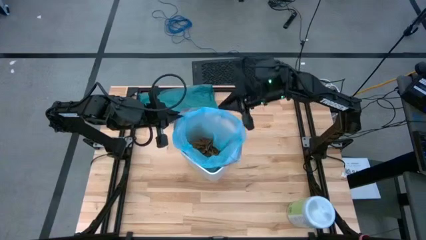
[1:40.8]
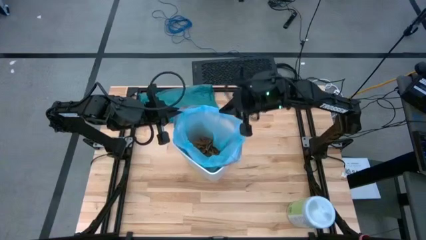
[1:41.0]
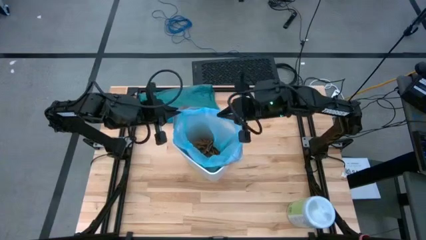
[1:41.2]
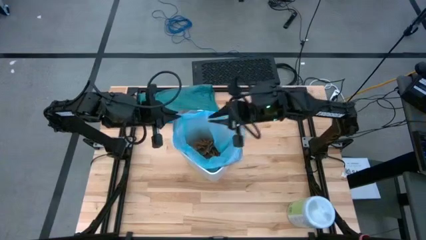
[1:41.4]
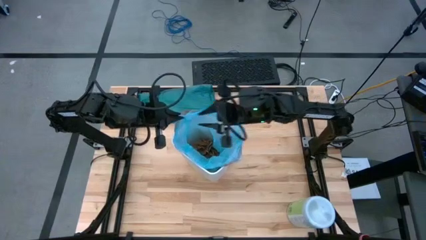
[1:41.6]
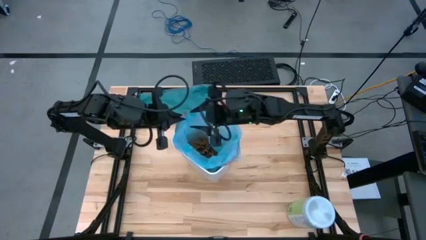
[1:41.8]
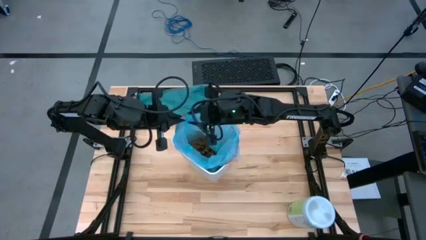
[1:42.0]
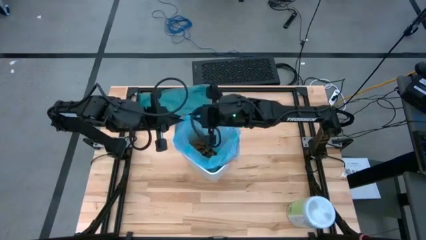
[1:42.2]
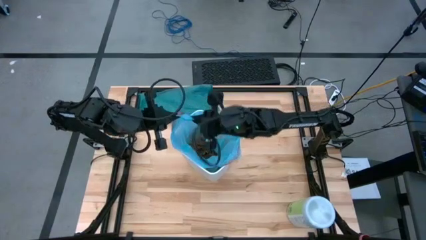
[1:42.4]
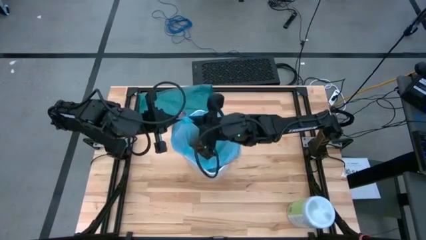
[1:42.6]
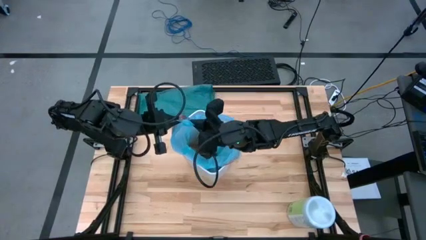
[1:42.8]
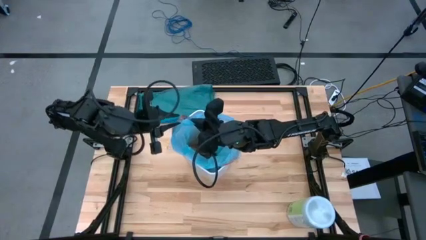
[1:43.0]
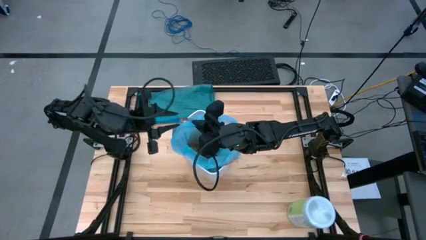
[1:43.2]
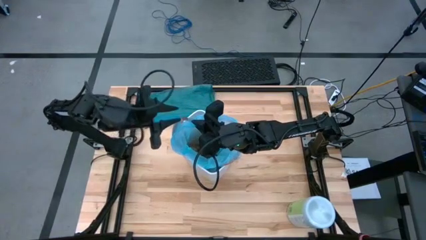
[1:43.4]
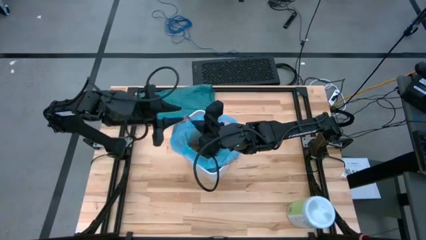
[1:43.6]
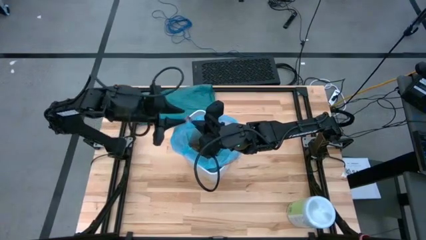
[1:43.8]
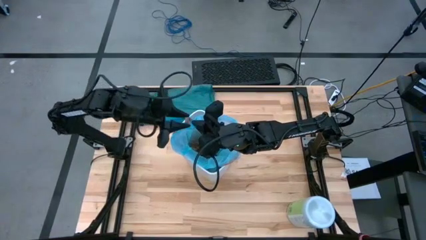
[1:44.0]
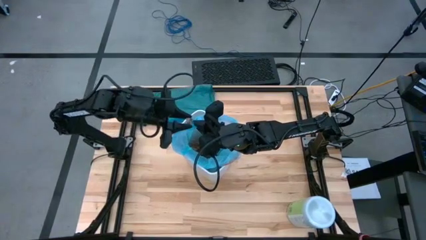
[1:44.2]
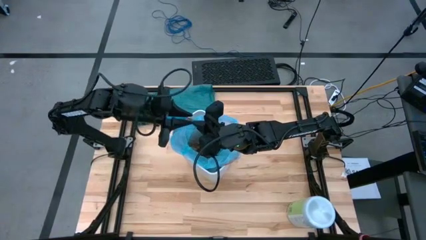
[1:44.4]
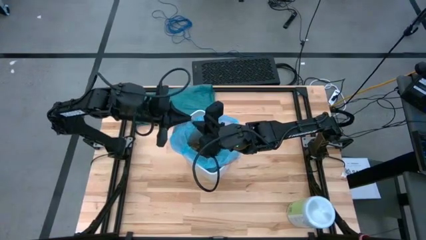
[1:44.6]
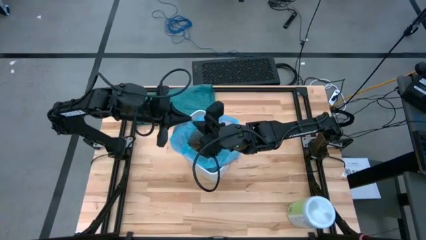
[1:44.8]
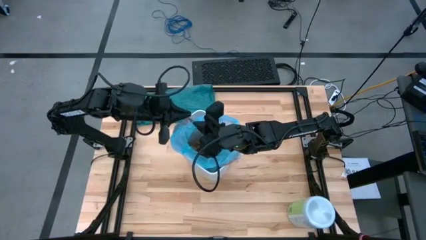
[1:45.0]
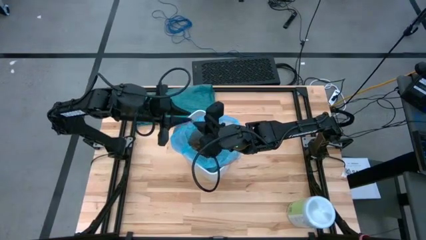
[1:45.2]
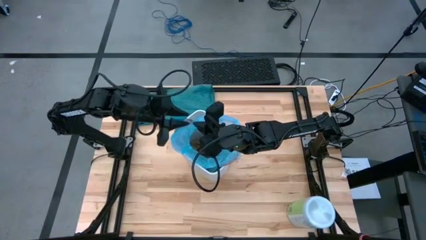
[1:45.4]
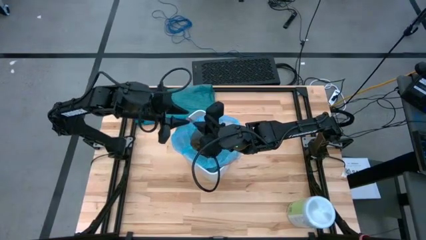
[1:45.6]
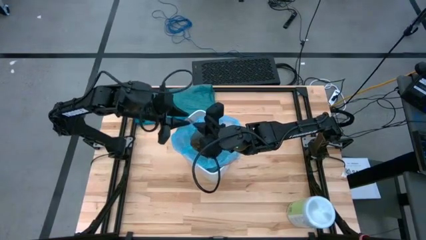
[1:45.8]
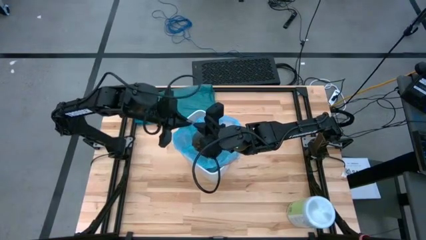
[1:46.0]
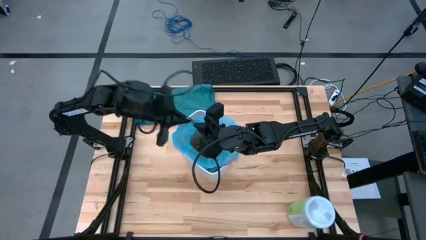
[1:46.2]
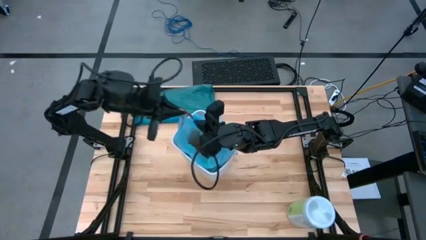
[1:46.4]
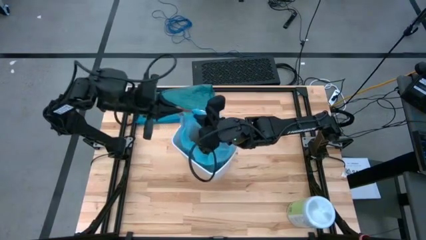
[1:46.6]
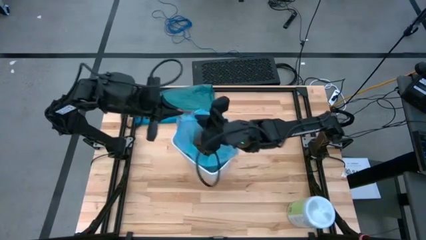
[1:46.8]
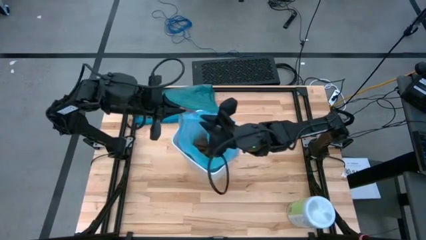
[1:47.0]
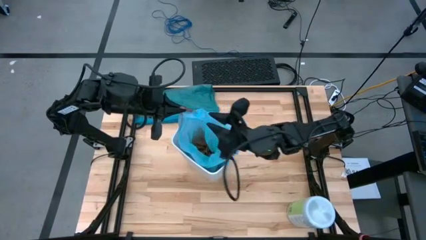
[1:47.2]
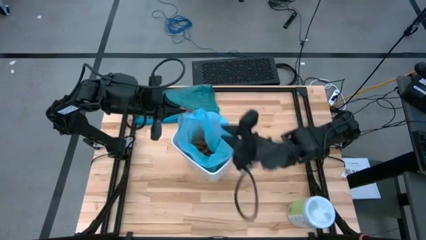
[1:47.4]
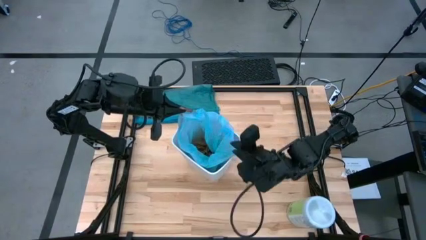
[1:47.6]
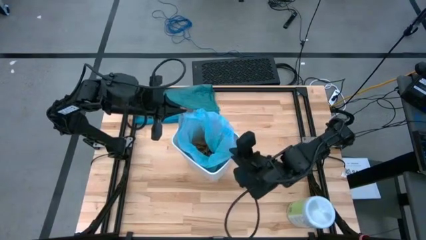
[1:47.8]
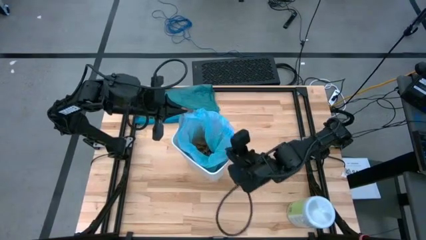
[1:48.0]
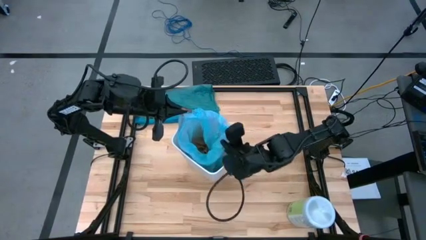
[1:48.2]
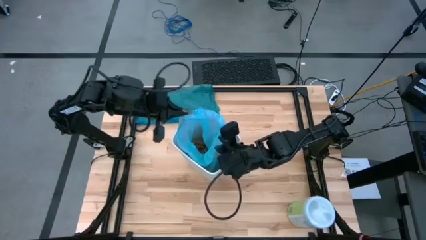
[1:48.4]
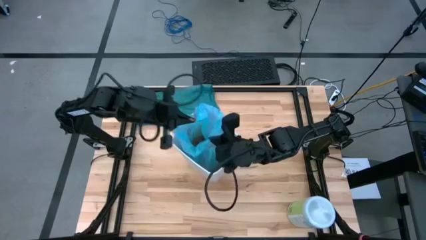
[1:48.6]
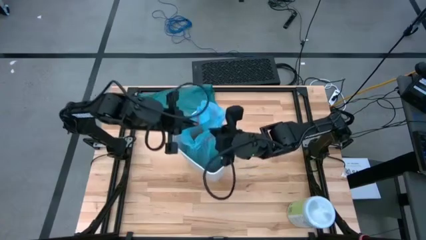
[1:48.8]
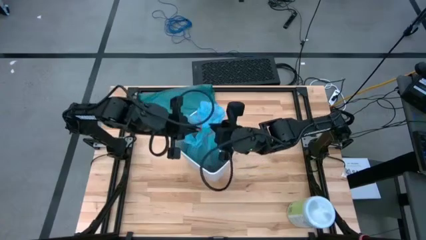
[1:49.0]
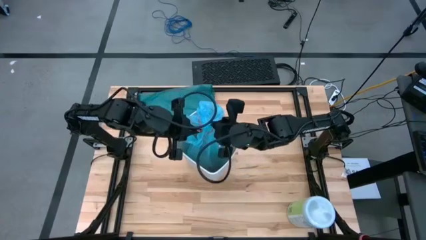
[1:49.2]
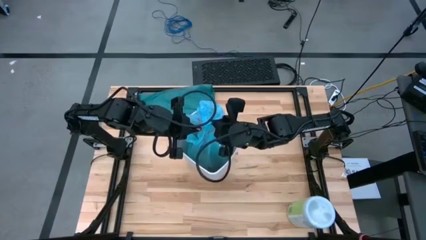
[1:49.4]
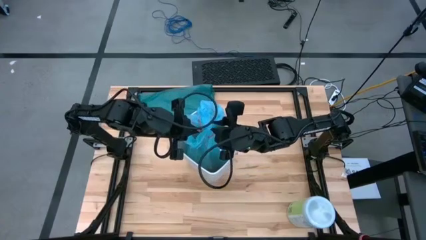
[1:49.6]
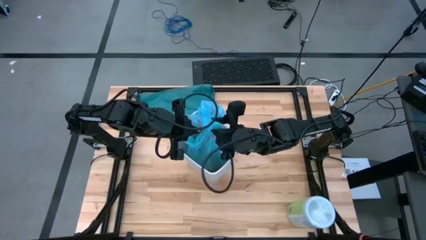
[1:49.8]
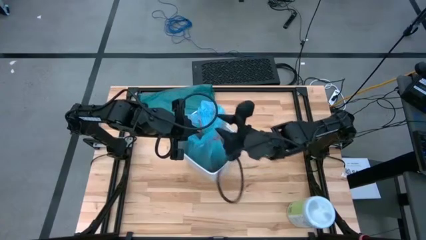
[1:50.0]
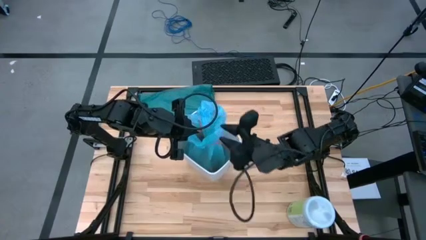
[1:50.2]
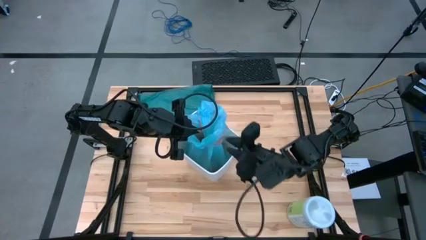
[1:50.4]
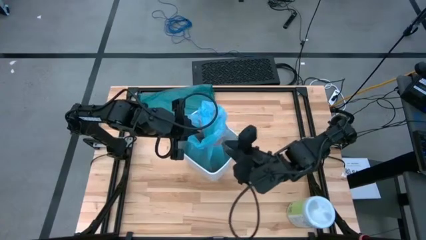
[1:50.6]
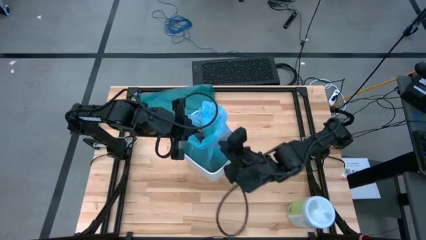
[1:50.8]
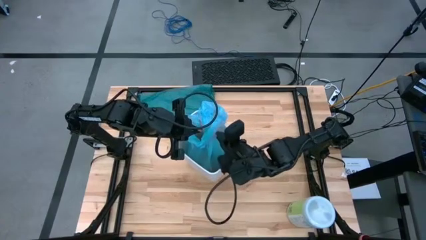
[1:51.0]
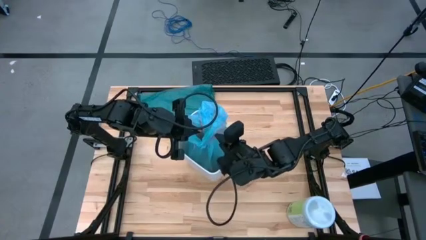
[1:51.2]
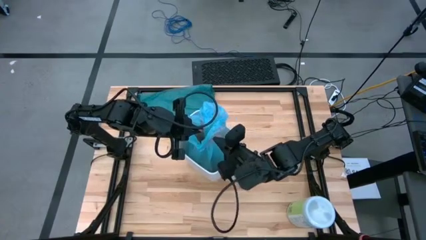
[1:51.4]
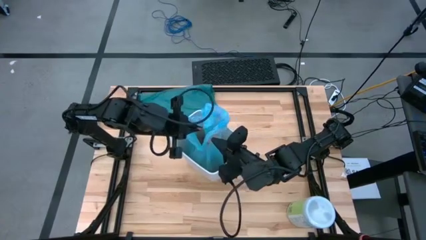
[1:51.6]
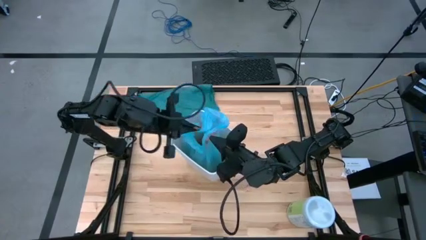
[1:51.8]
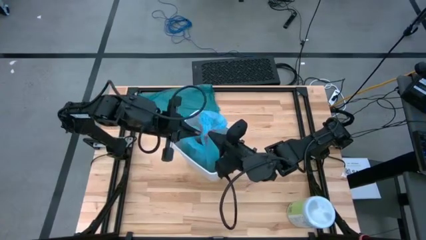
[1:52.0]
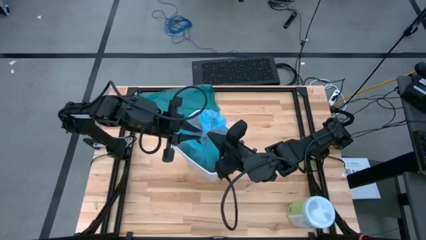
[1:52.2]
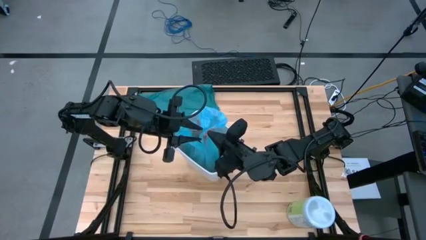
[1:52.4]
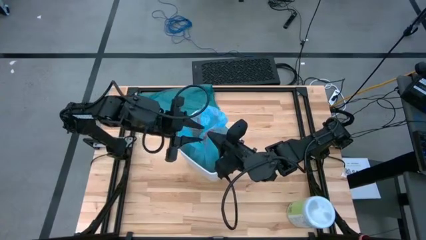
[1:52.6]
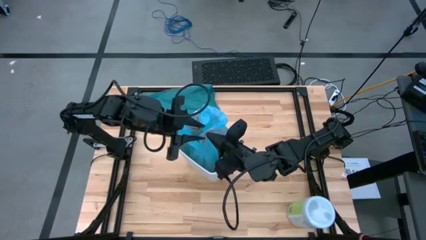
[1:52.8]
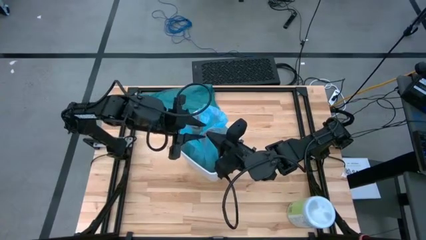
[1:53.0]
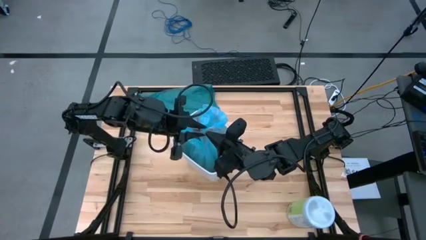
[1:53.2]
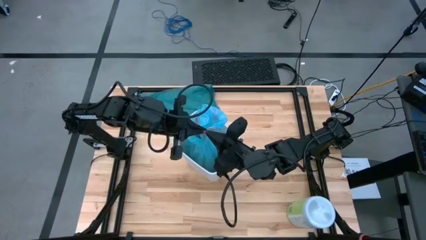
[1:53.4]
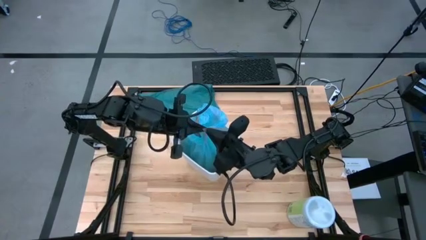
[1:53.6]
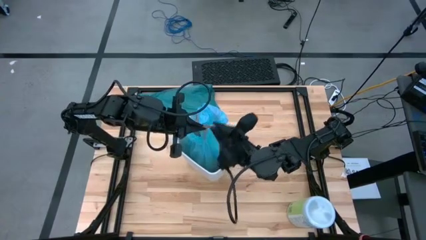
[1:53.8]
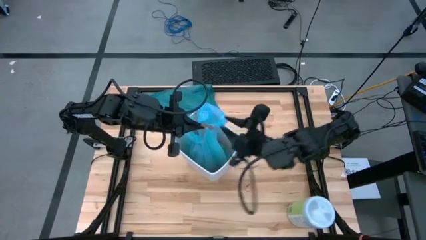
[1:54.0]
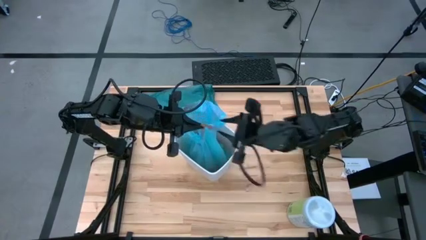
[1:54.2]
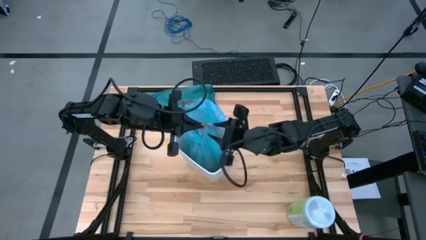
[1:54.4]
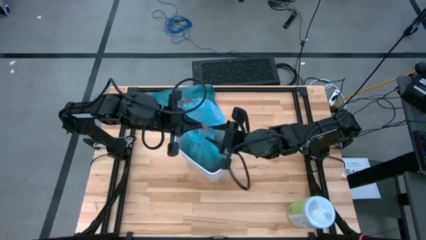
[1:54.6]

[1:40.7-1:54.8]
Task: place trash/remove bag and relplace
Remove the blue trash bag from the bin

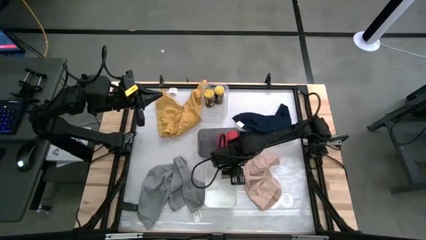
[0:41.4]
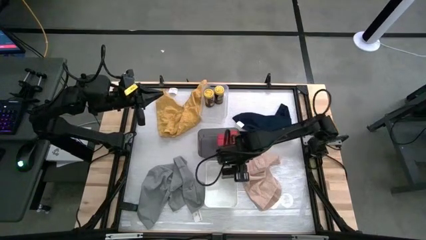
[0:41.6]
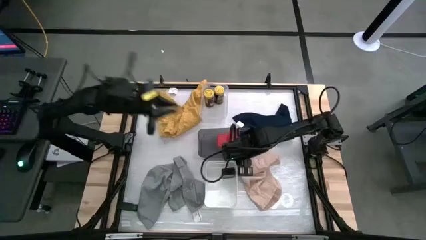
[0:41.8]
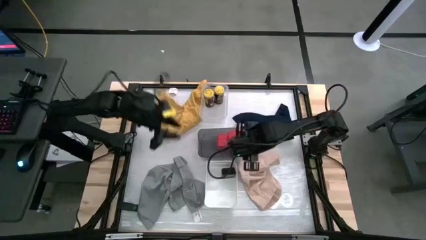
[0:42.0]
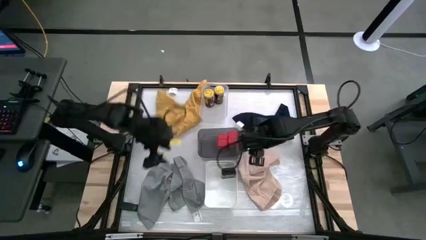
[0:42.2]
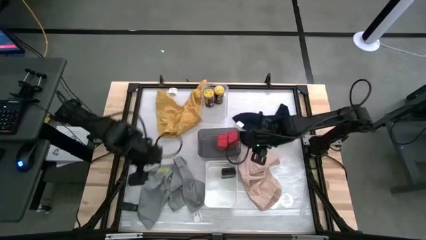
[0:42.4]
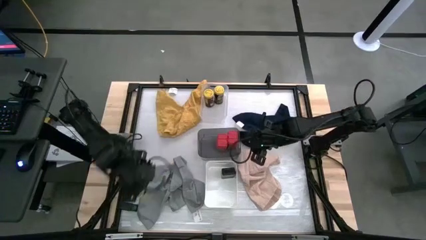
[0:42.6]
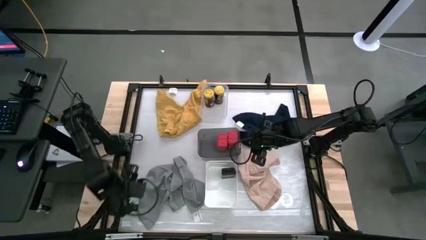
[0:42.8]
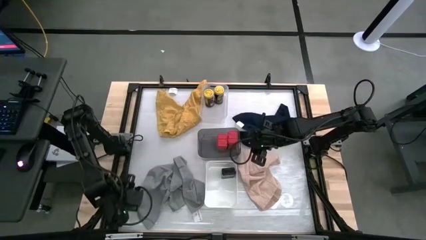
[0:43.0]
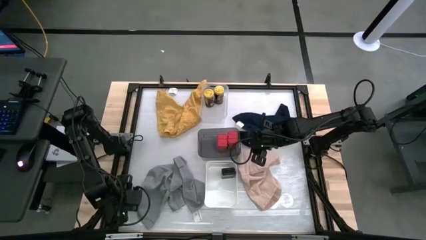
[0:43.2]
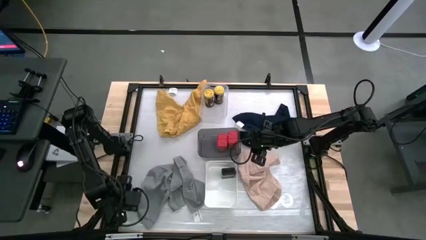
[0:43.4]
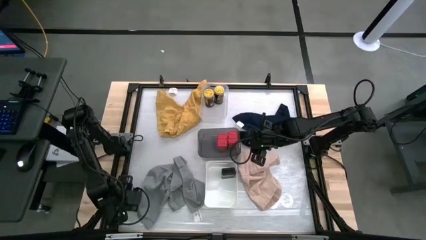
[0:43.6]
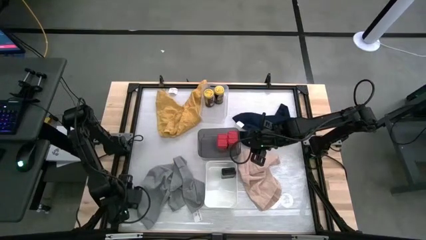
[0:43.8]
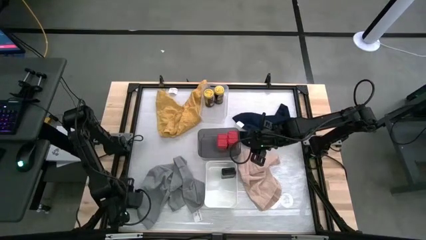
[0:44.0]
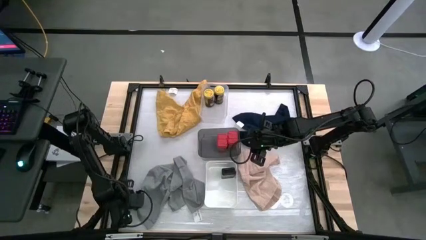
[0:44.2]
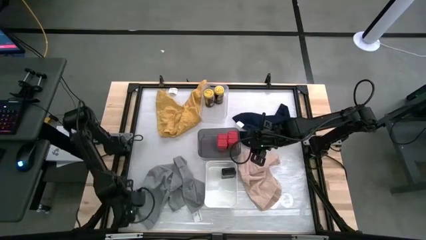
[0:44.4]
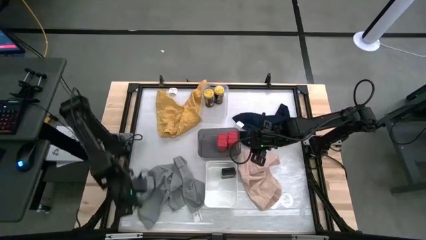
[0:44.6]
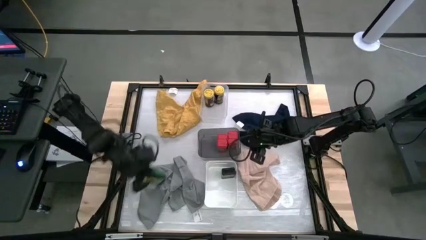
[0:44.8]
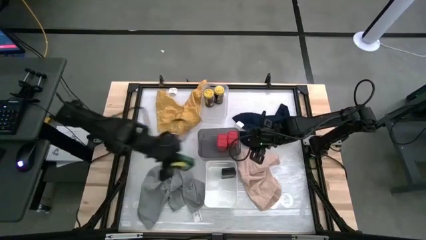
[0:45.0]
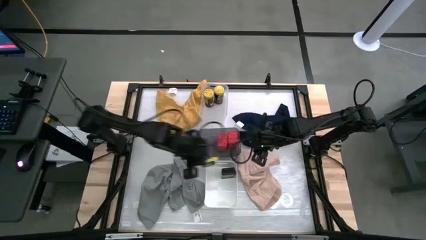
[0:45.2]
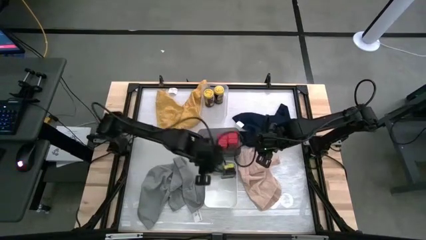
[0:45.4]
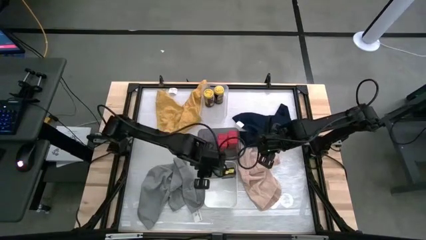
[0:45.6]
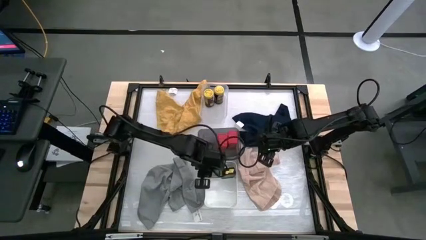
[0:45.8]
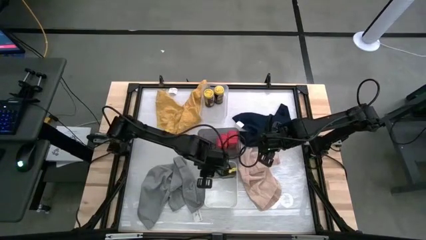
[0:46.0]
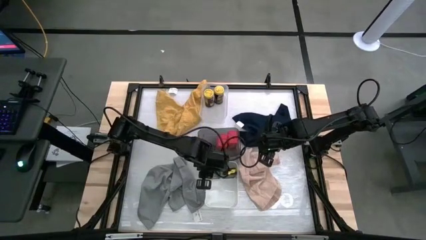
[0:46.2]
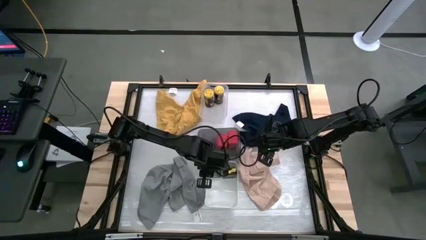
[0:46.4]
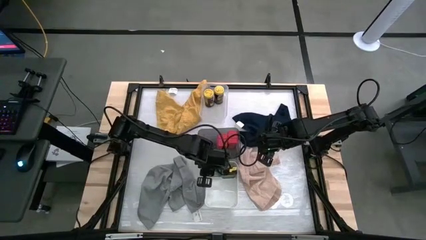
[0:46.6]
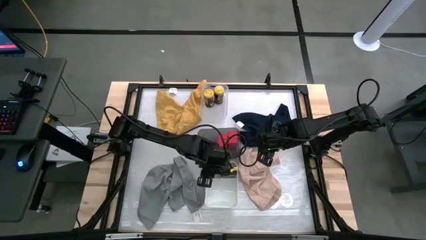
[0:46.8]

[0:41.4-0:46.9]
Task: Sort spices by type
Put the black spice can into the white bin
